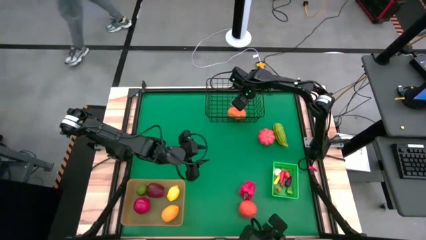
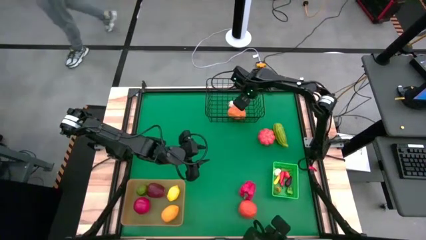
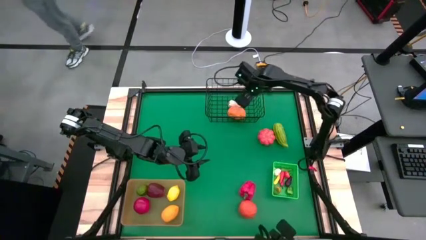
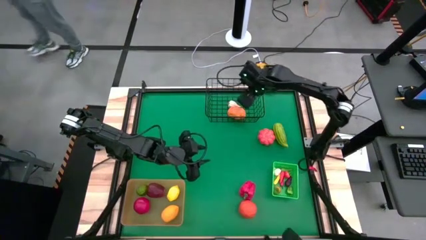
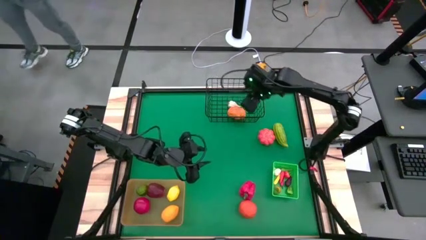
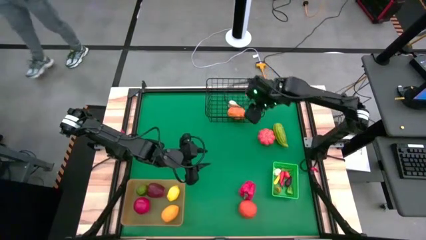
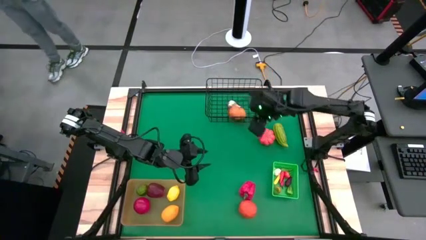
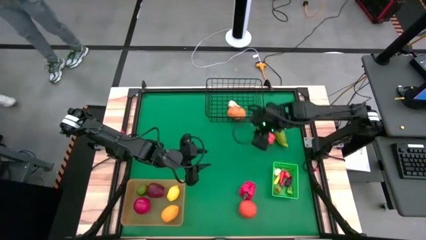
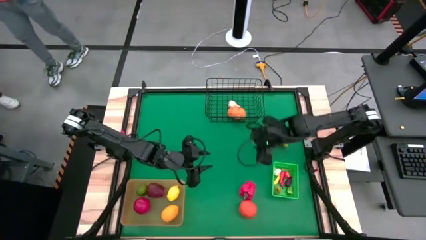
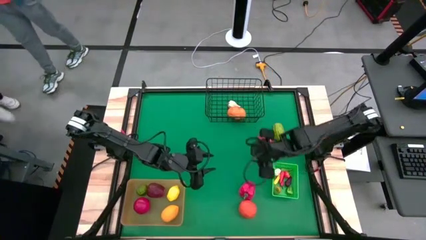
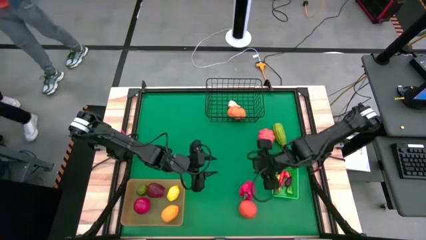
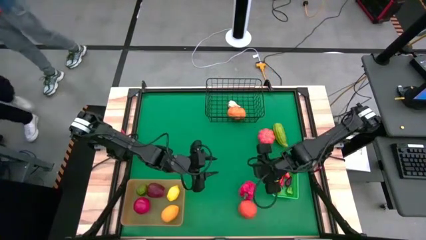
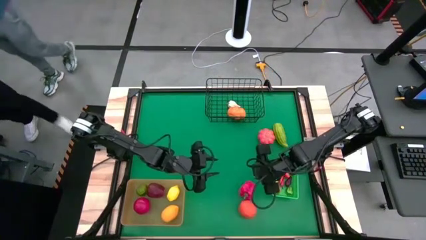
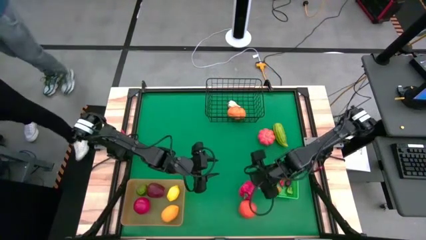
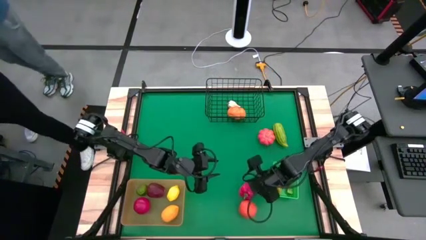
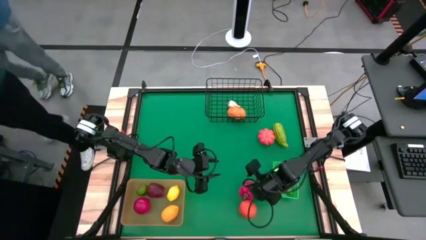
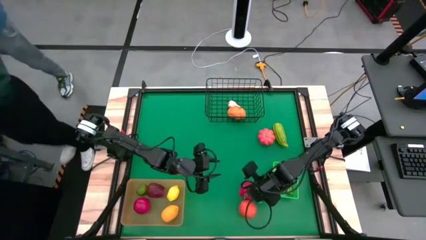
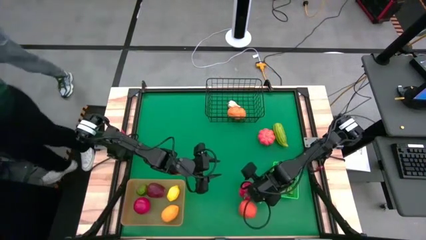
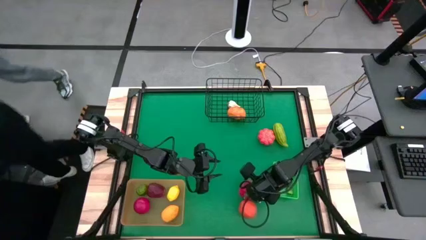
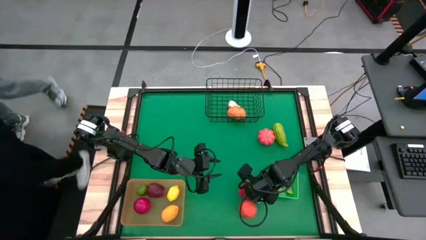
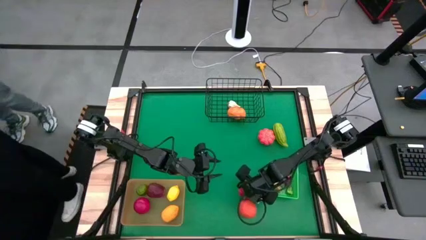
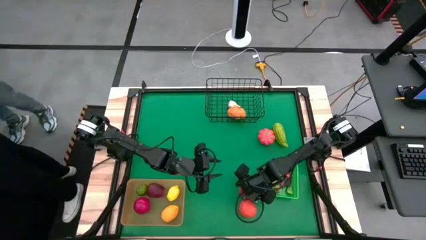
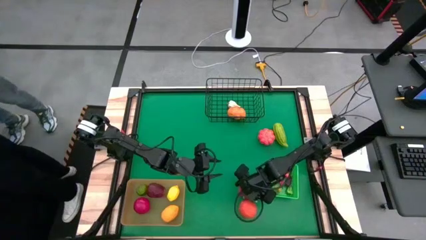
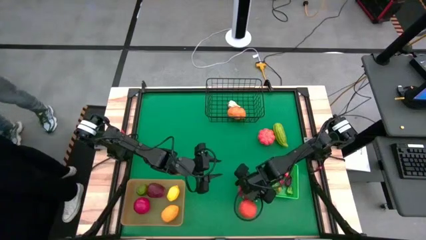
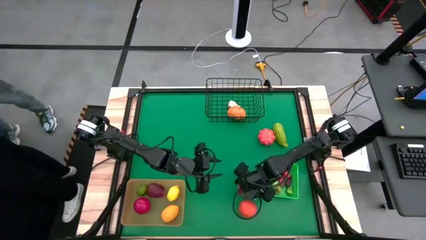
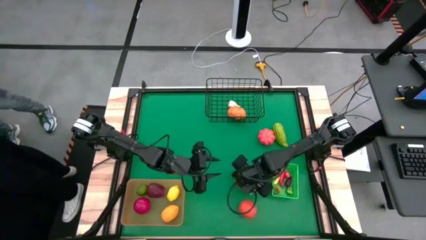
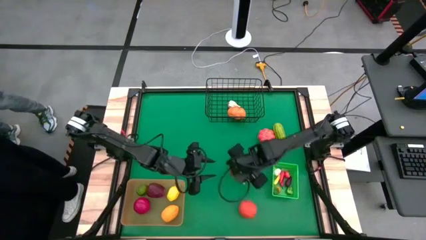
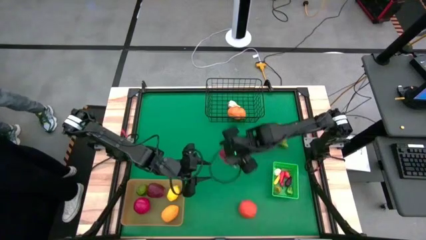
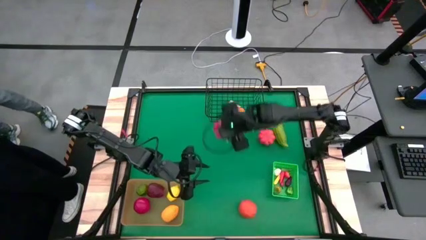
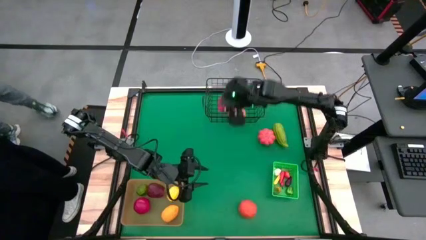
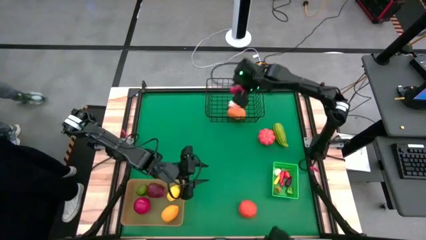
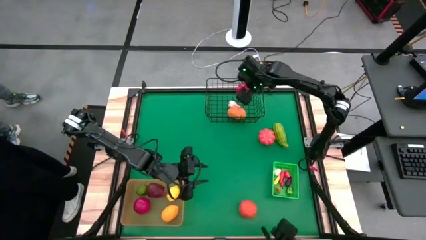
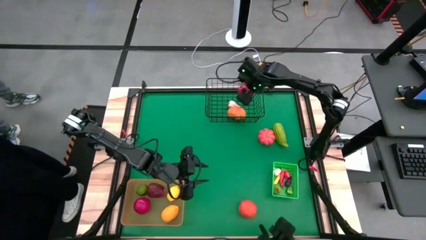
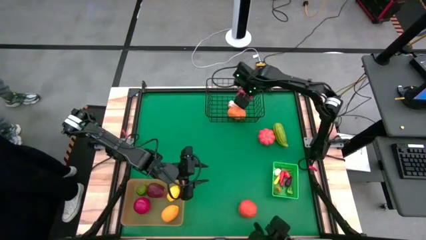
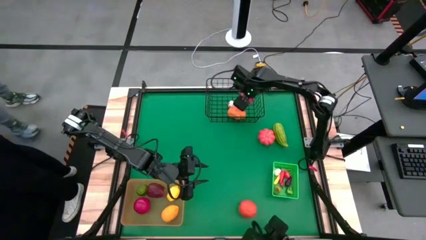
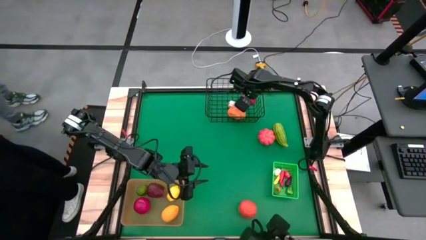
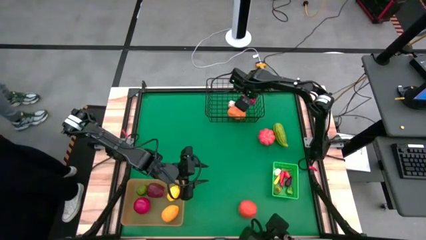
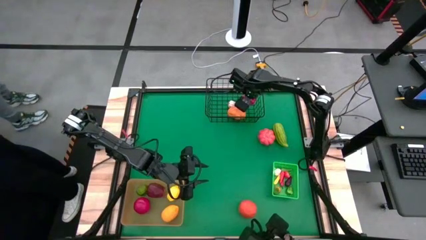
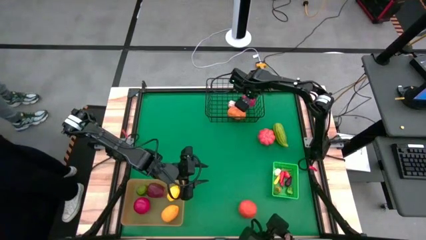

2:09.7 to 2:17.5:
Task: Sort produce into baskets
Put the red bell pepper into the black basket

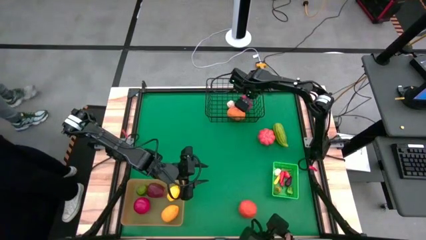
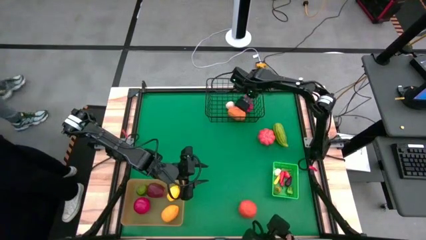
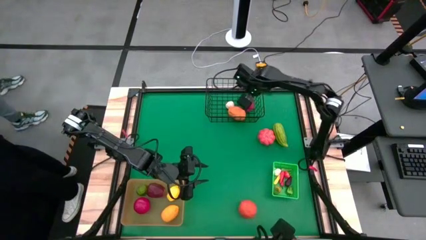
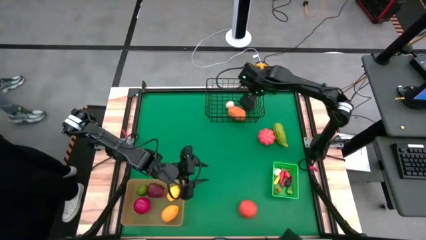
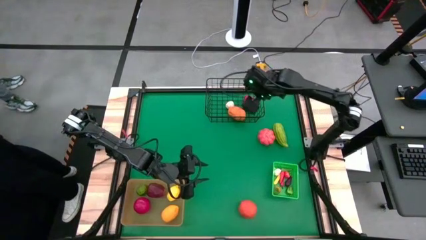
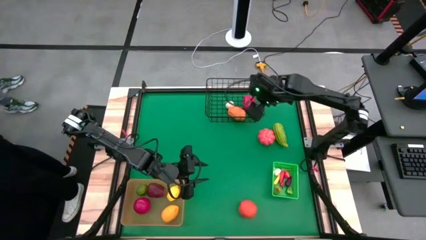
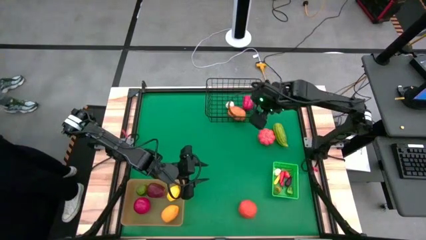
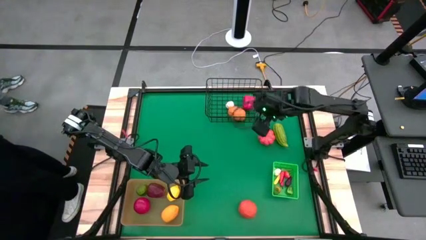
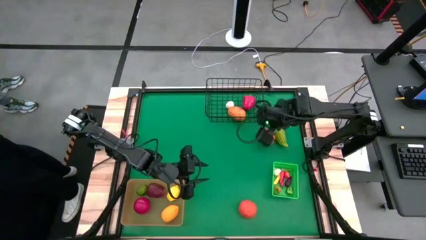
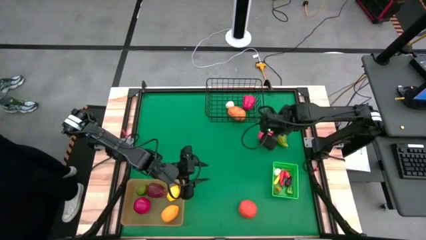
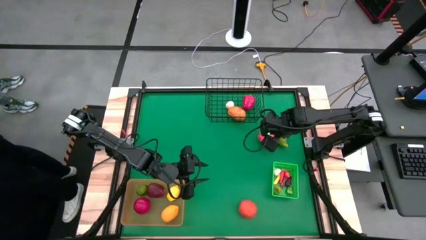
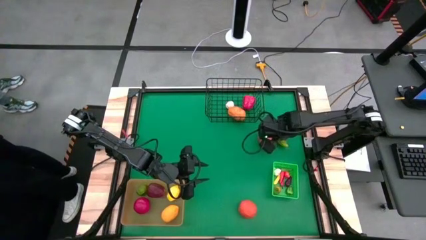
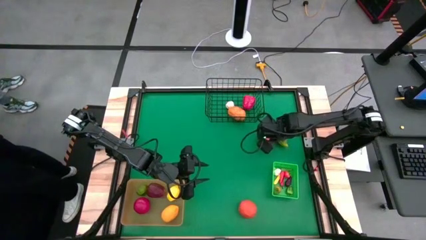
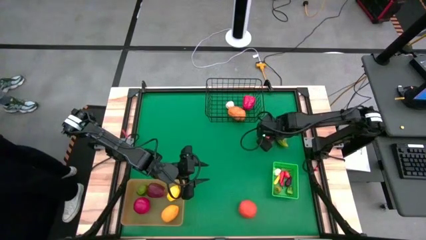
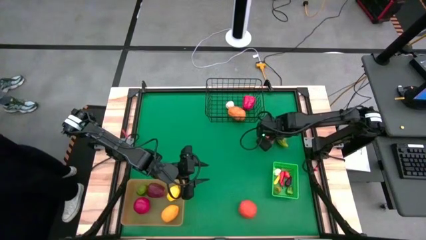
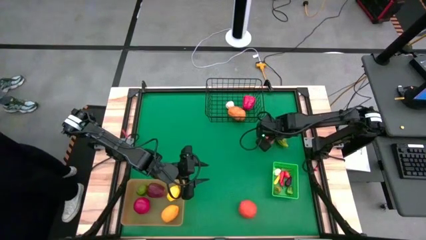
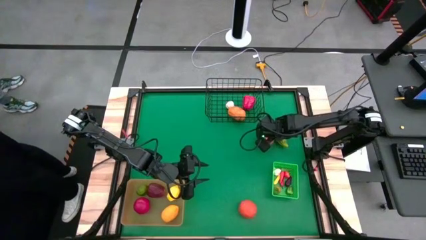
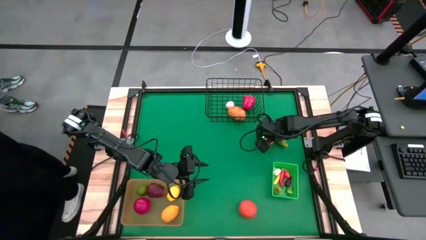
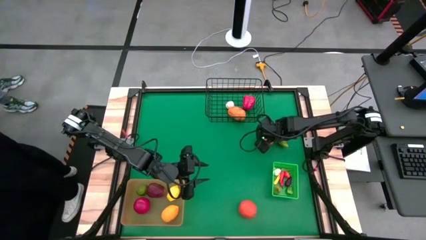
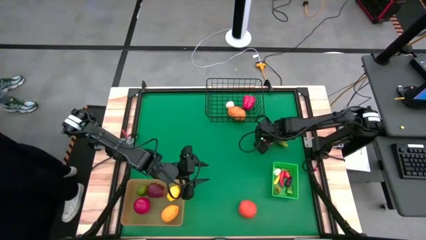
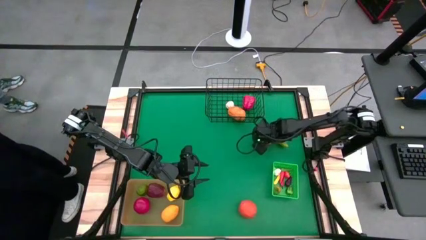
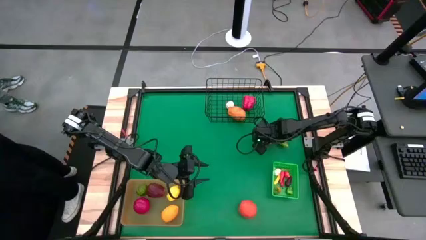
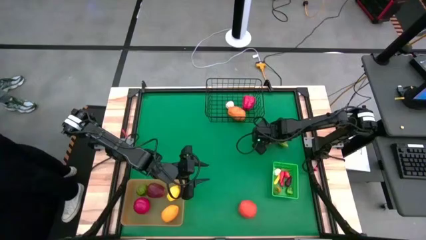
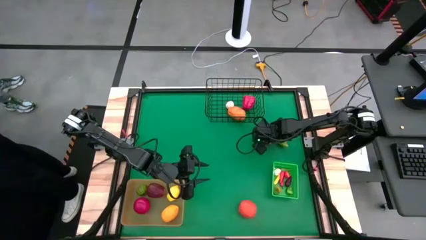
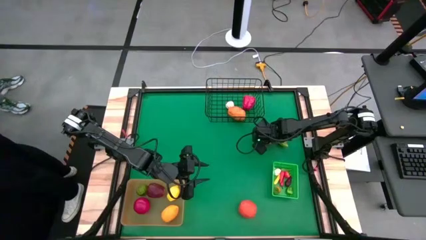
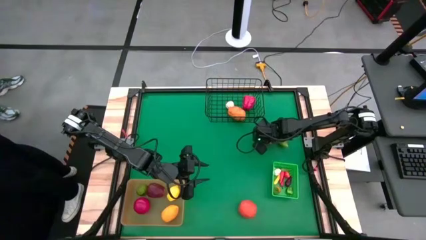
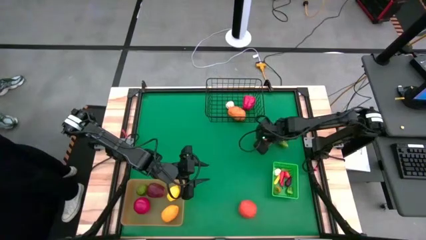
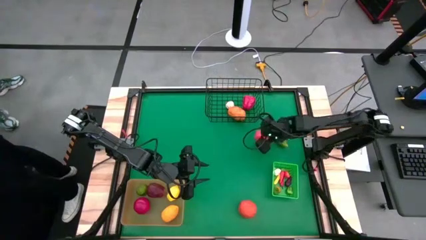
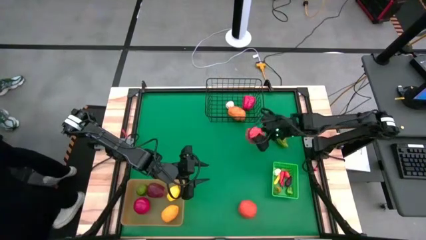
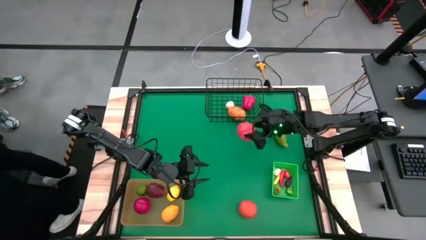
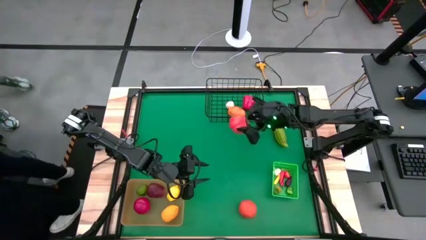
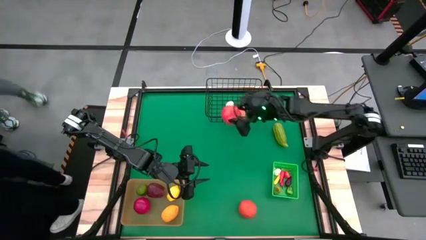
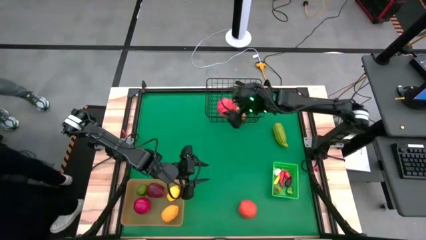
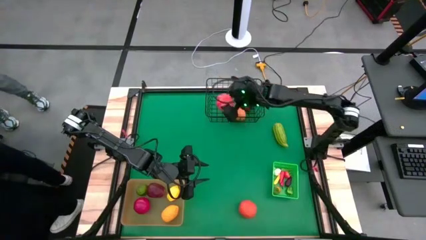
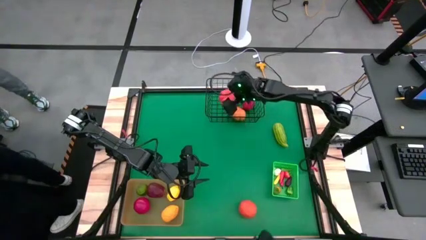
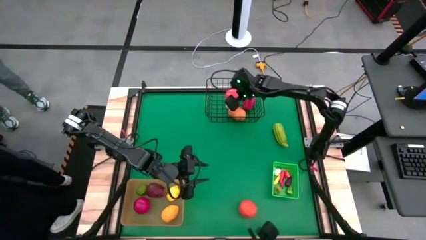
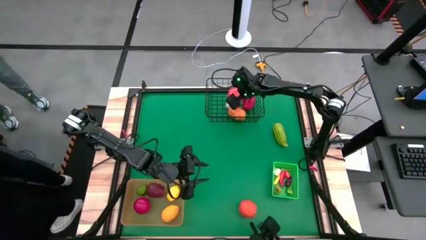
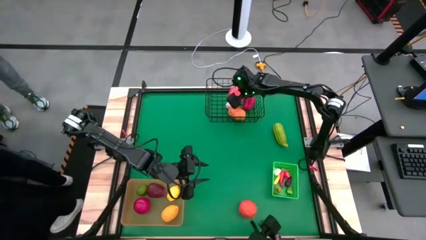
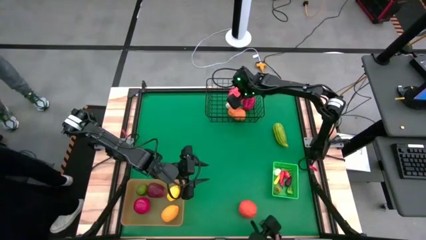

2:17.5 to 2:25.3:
Put the pumpkin into the black basket

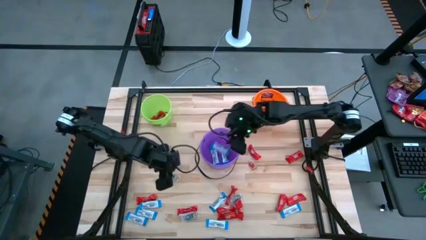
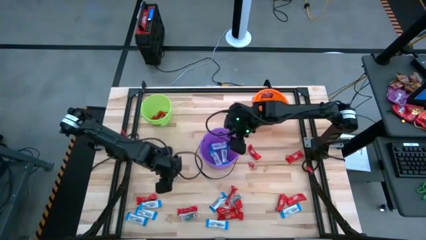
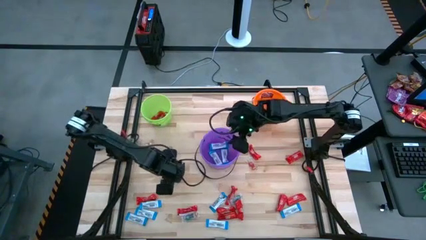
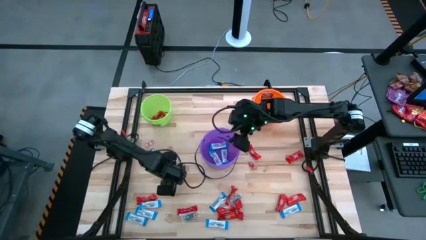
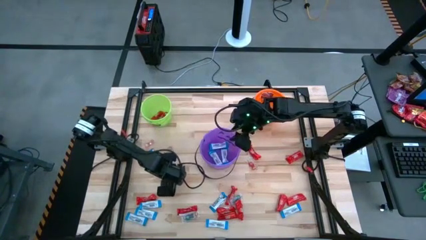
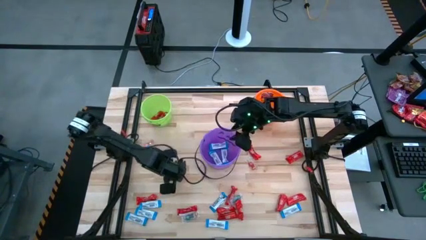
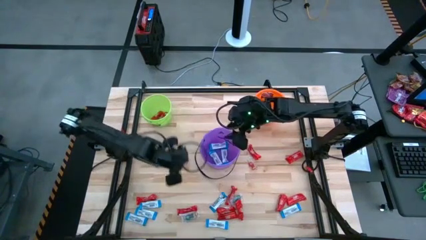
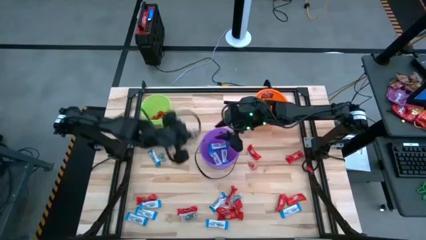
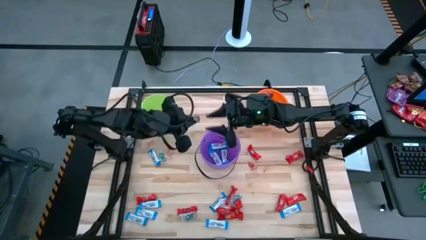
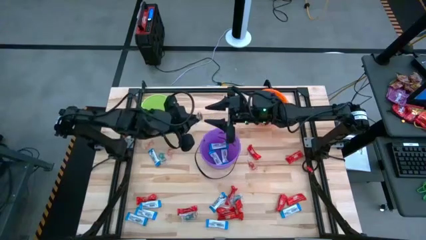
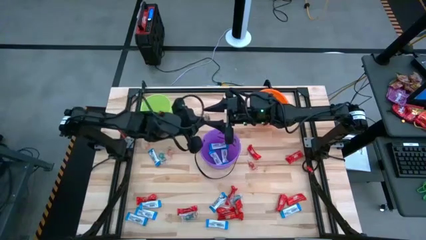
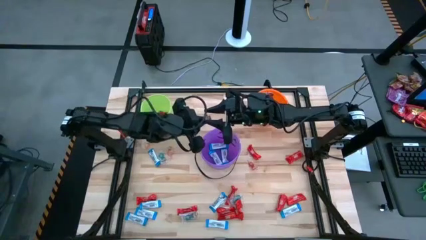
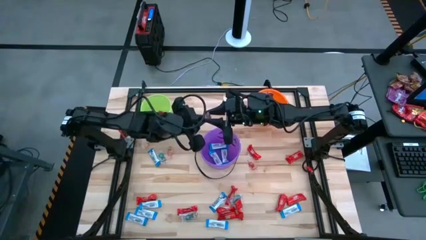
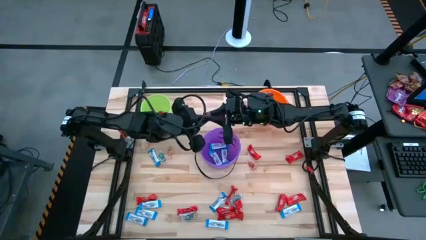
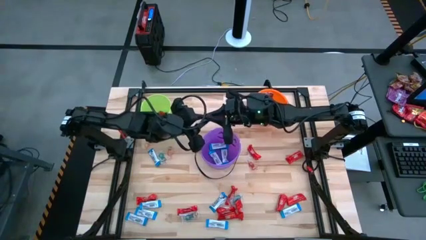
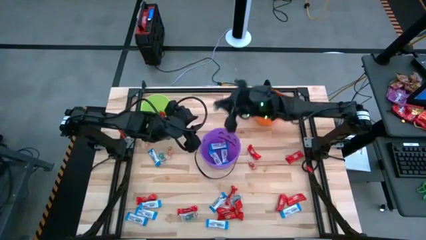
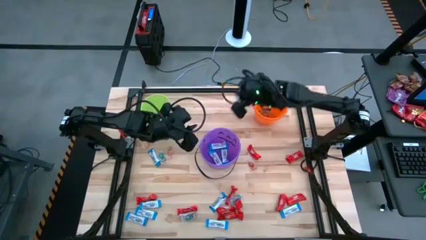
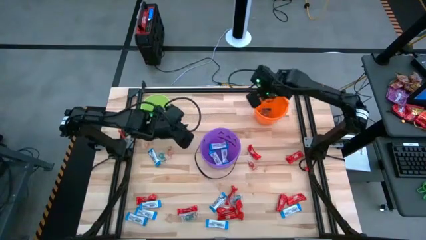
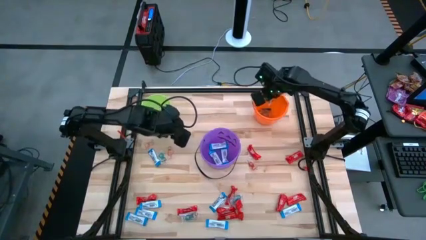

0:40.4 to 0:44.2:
Task: Sort candy by brand, put in halloween buckets
Put the blue gummy into the orange bucket
